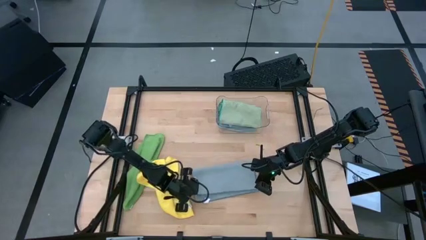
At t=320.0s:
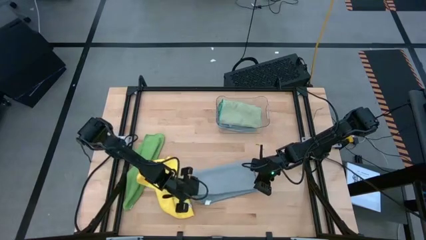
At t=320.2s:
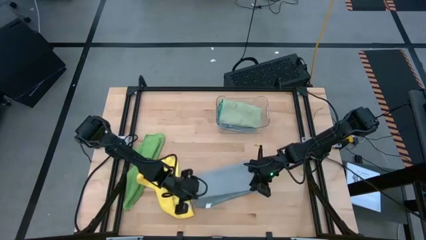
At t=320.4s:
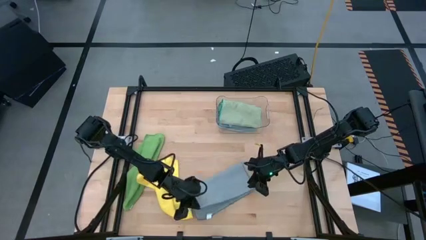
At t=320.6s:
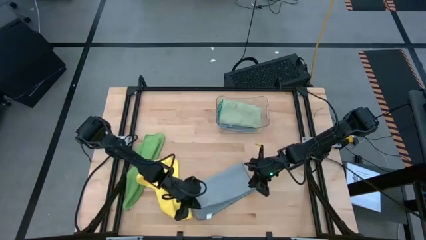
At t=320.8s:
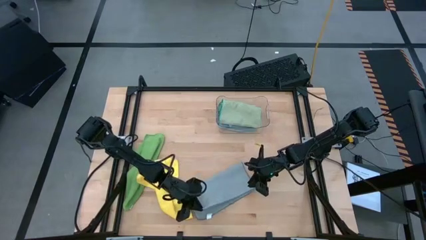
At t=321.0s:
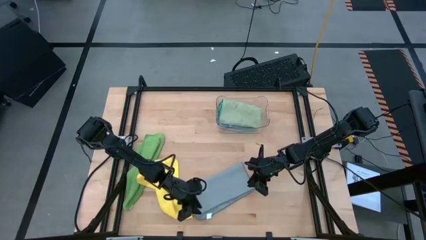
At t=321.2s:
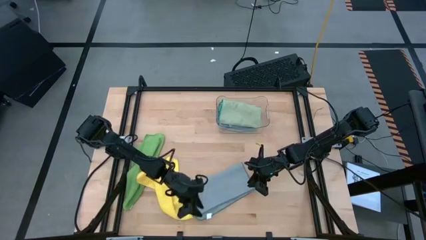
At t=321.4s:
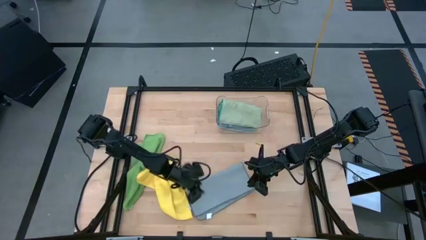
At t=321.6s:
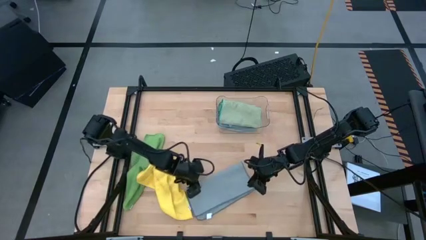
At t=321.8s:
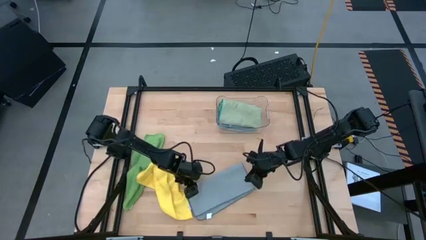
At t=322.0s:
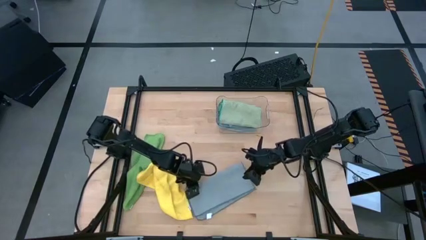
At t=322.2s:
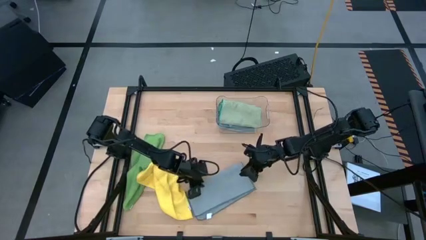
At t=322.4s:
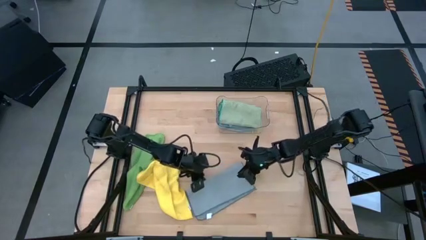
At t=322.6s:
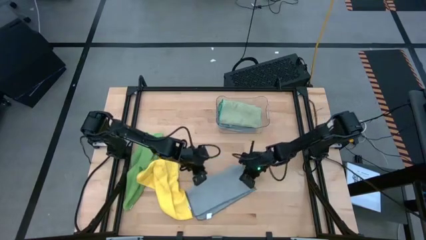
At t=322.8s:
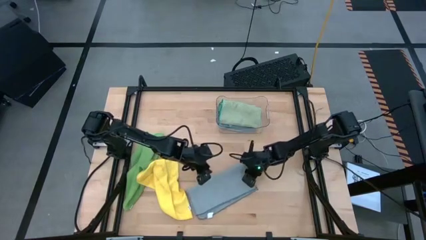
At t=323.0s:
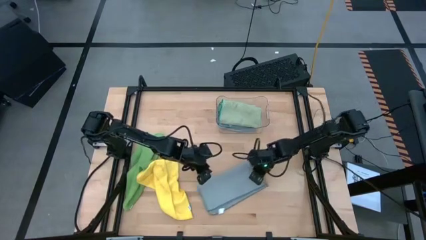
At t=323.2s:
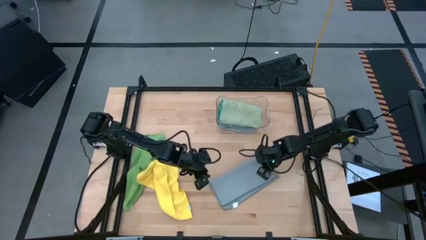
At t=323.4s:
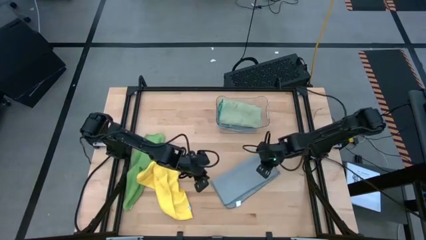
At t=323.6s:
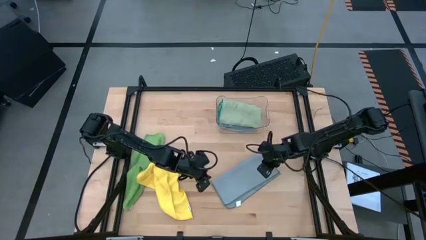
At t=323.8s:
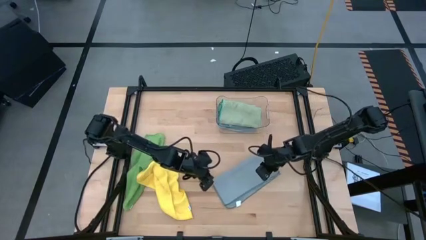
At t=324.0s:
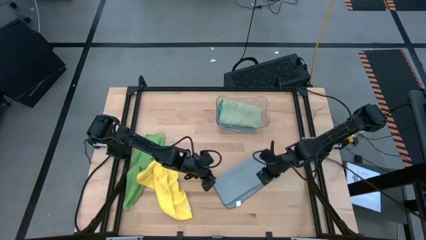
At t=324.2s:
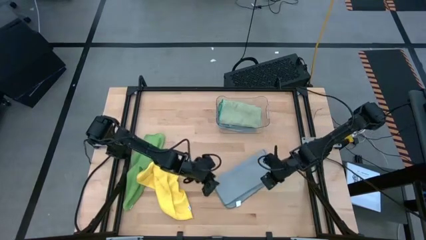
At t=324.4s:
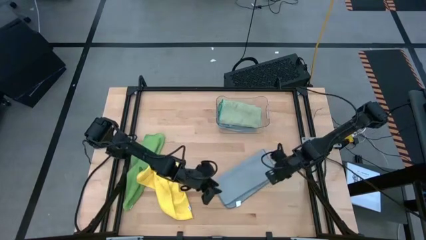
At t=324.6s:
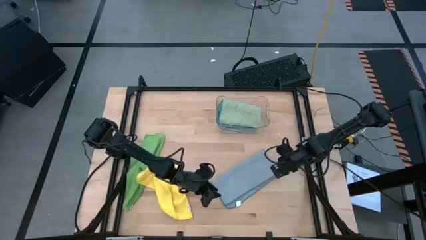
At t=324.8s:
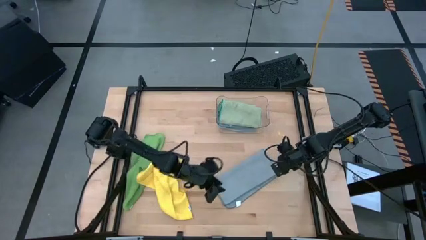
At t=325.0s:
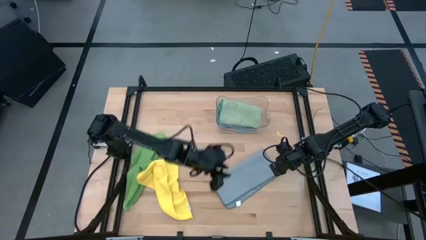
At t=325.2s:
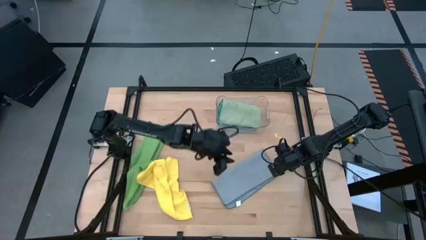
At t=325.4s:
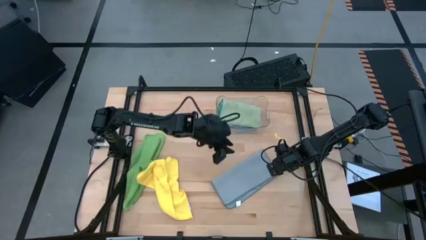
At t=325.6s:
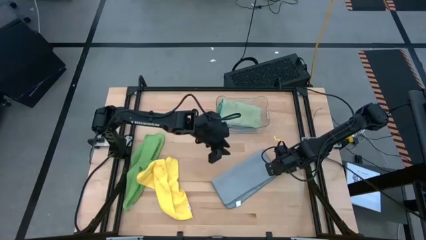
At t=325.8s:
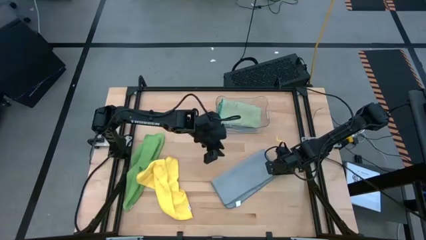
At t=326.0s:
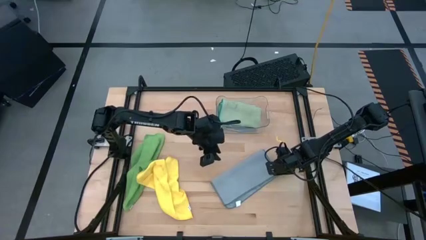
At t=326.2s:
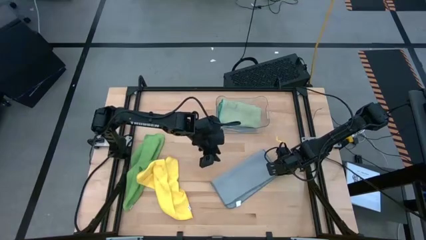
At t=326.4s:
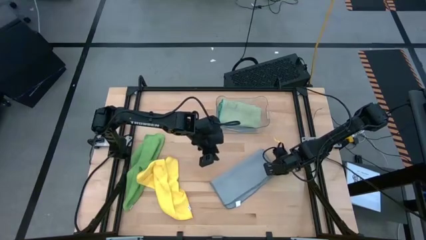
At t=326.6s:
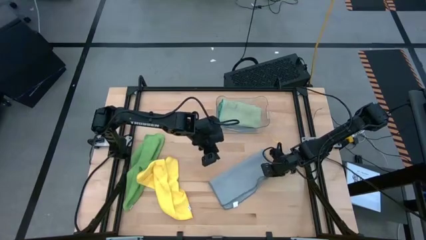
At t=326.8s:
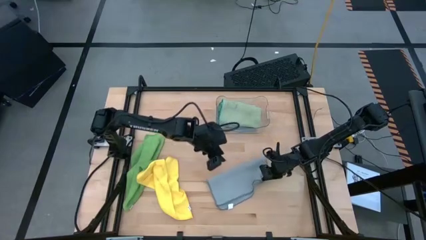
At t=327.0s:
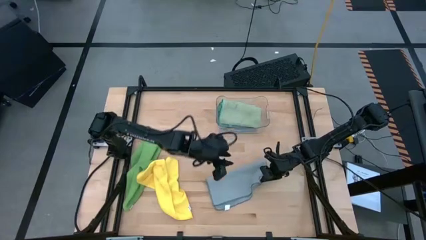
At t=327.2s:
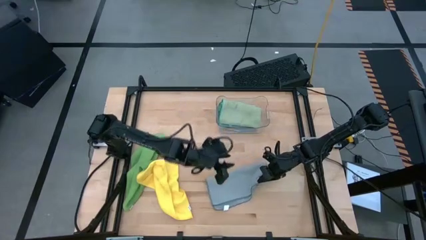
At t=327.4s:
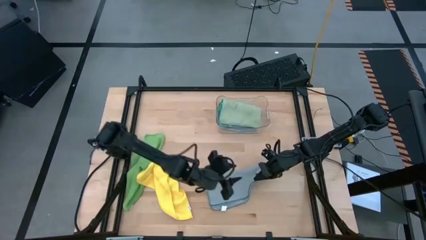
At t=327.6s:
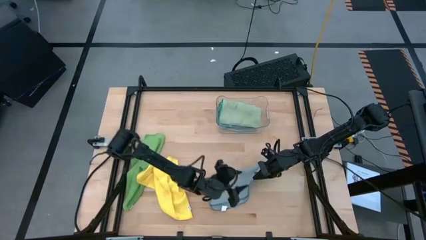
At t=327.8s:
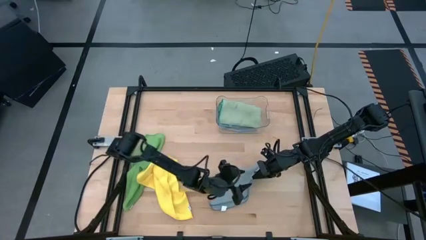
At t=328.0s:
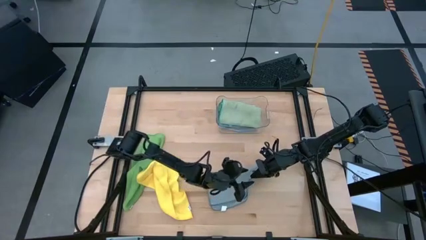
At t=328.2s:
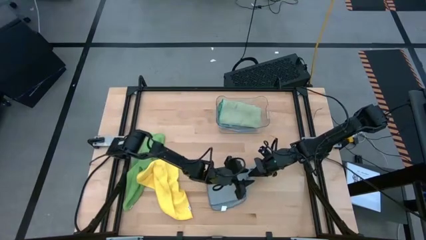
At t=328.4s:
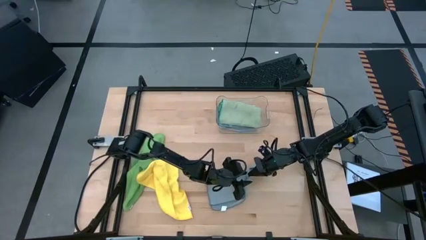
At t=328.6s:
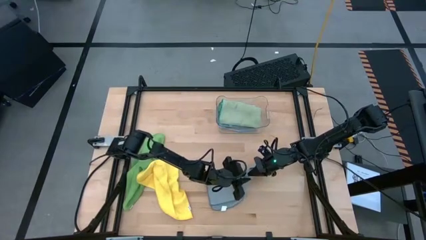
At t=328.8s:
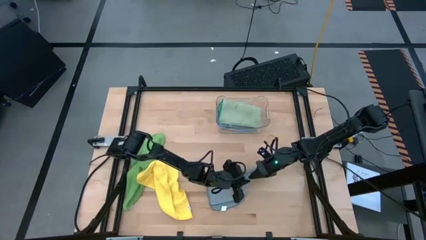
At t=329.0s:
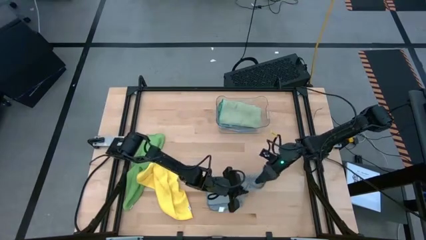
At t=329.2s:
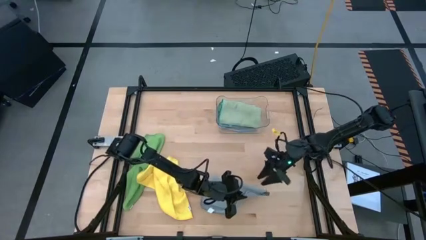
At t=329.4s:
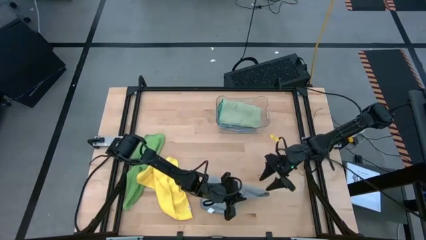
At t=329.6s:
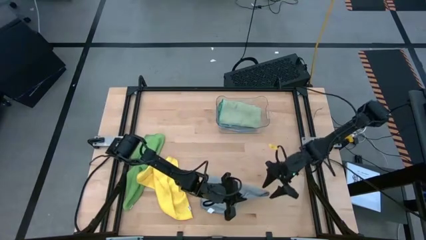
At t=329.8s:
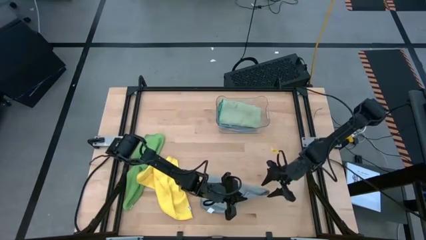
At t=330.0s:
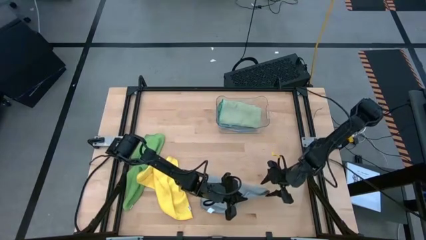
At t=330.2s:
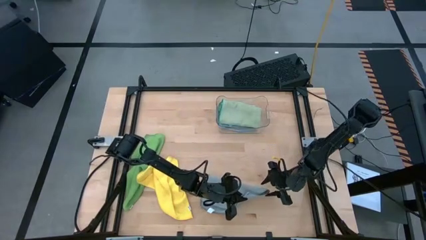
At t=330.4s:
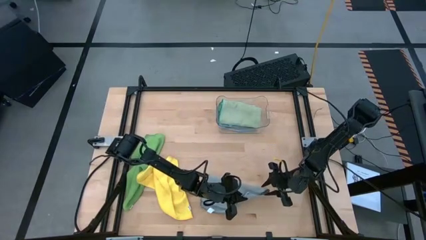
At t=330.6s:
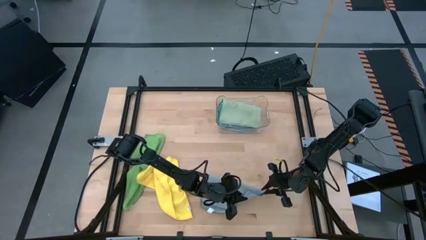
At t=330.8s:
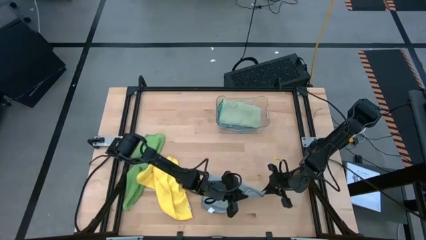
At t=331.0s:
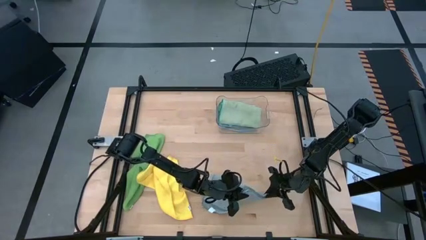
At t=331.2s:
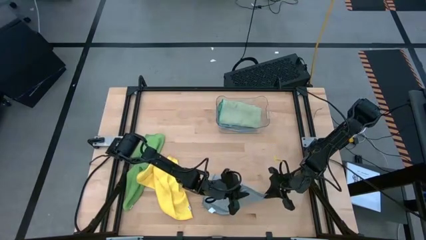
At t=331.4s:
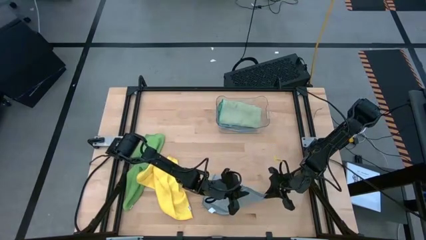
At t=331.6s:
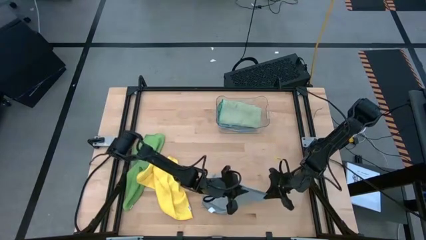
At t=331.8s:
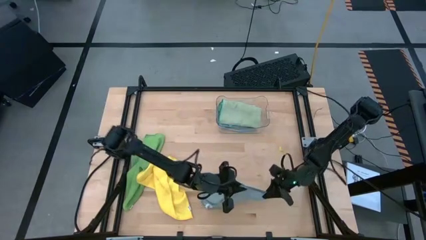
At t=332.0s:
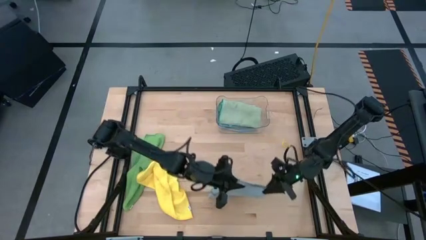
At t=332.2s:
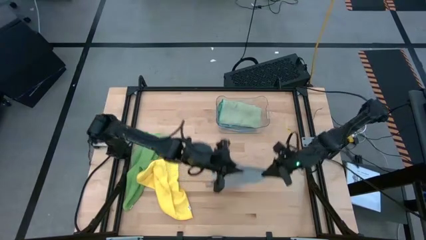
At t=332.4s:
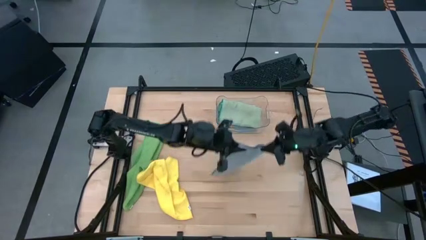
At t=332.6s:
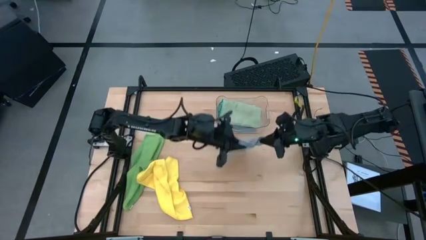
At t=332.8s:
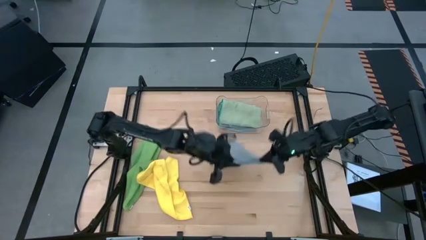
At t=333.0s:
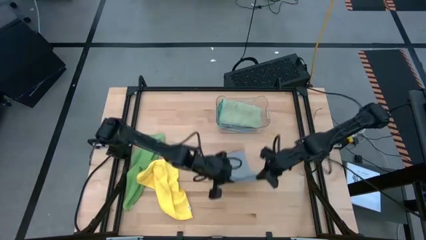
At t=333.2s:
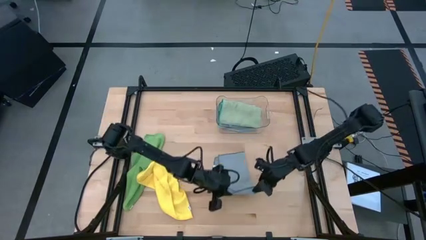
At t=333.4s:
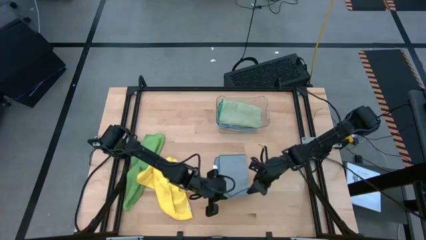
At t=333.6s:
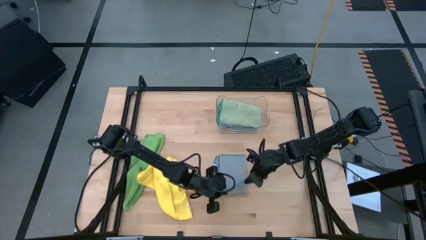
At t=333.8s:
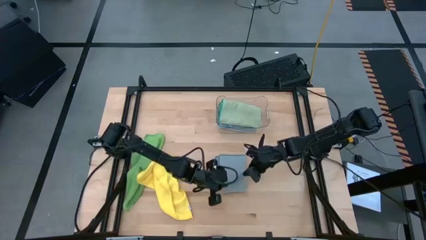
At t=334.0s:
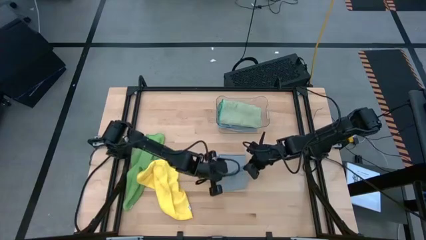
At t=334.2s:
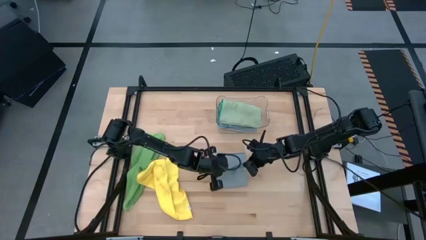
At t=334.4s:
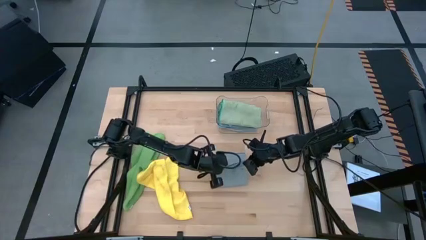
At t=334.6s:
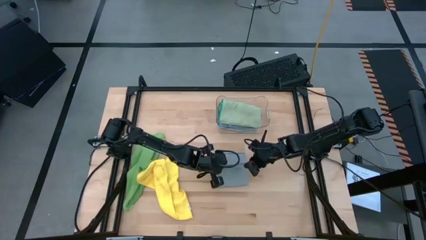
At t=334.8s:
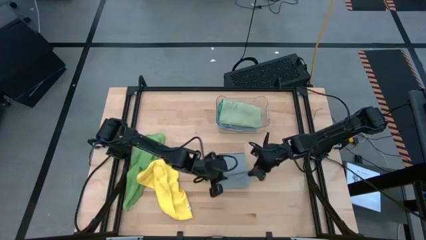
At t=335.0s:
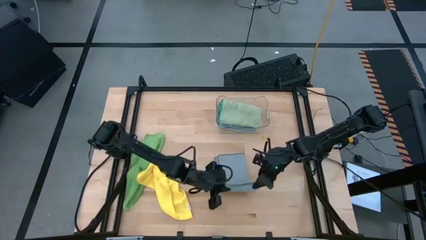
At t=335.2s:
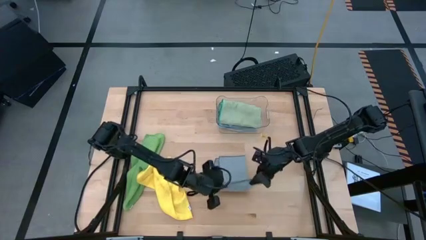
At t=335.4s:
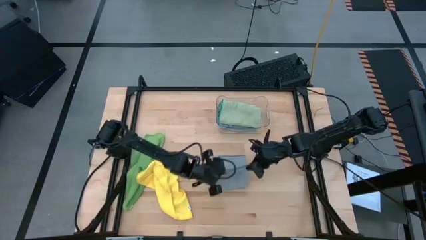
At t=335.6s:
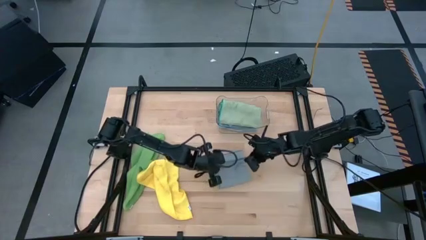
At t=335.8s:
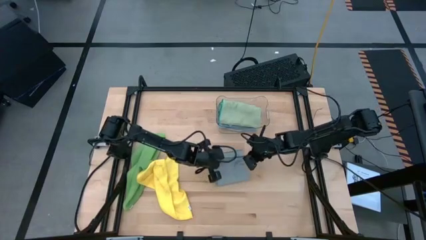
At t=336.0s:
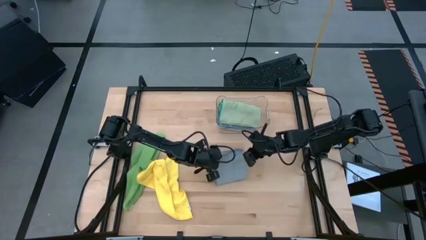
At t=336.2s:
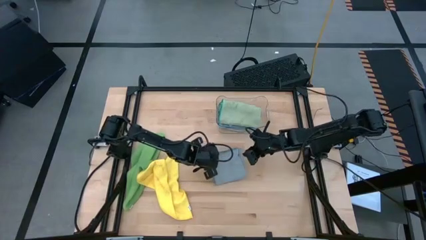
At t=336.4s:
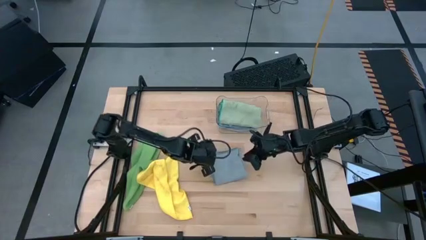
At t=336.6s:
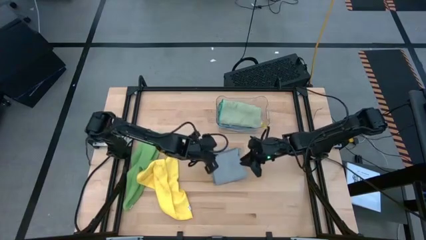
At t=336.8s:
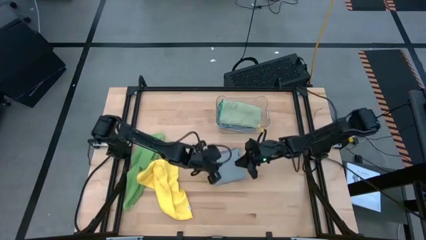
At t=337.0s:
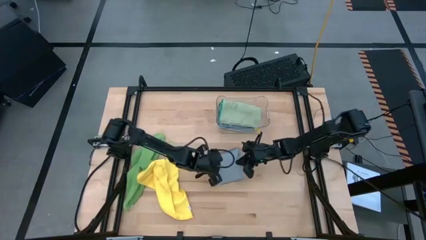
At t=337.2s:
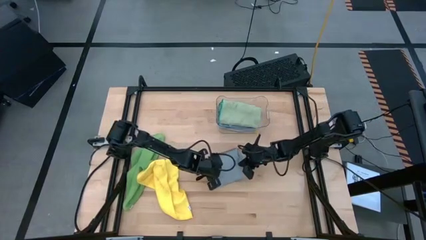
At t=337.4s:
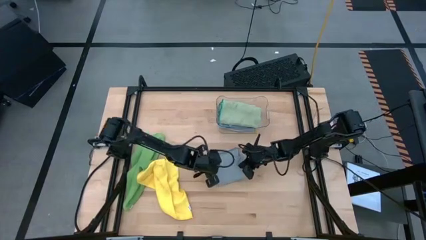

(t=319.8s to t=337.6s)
Task: Fold microfiber towels
Fold the gray towel
